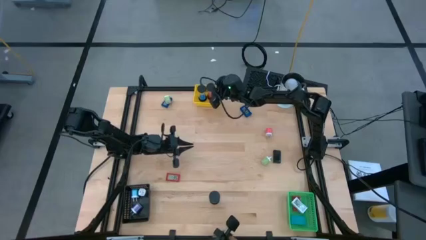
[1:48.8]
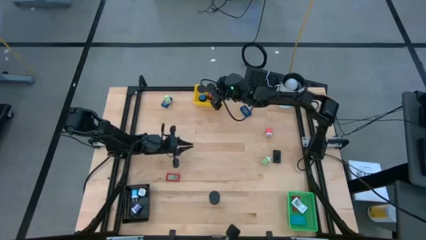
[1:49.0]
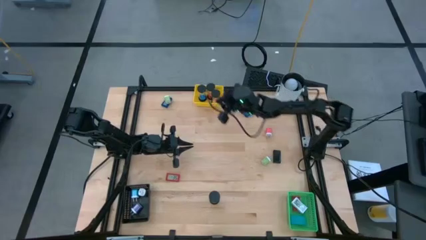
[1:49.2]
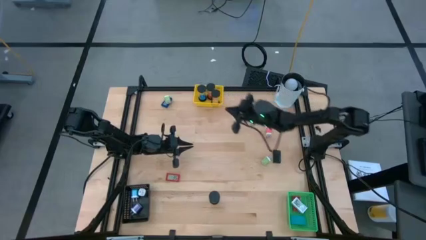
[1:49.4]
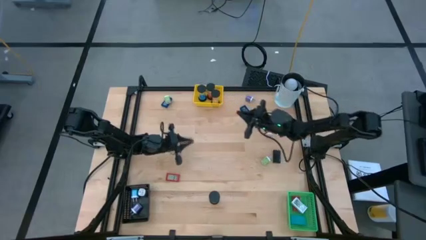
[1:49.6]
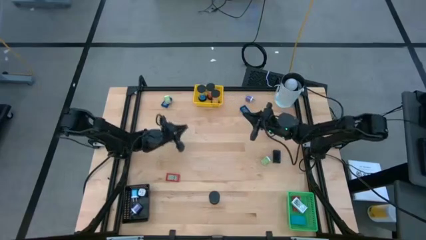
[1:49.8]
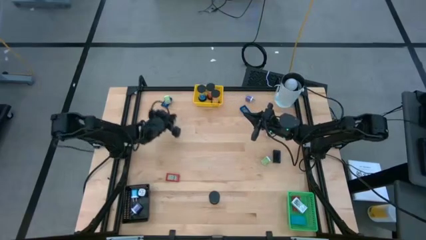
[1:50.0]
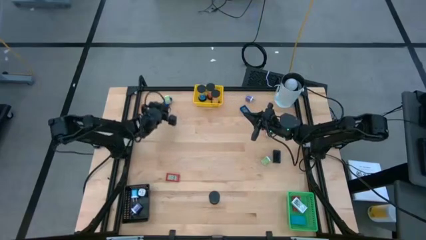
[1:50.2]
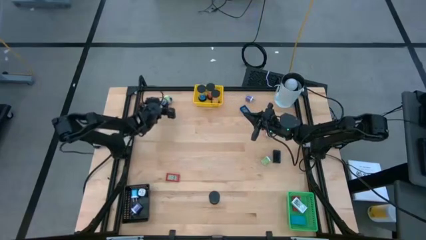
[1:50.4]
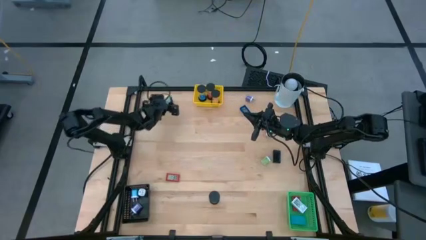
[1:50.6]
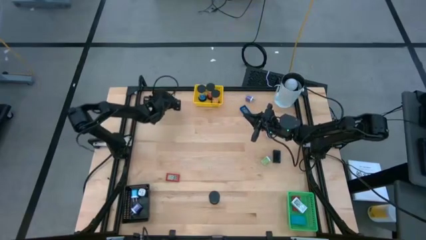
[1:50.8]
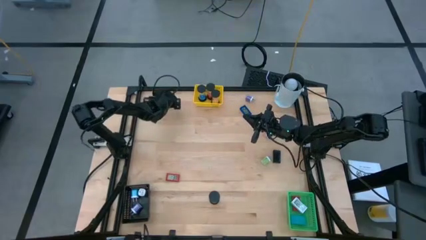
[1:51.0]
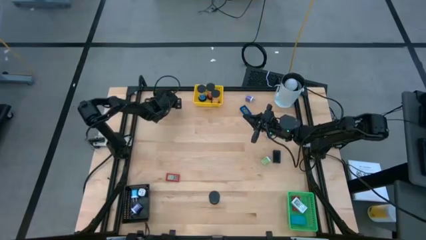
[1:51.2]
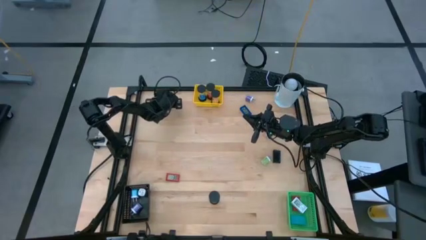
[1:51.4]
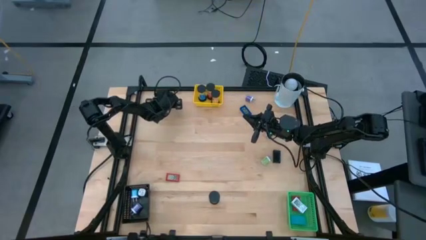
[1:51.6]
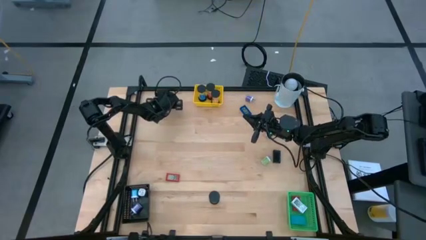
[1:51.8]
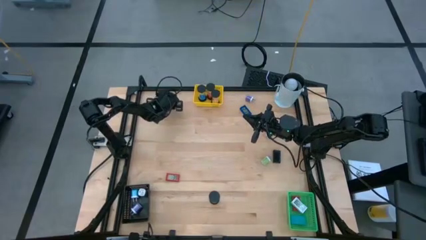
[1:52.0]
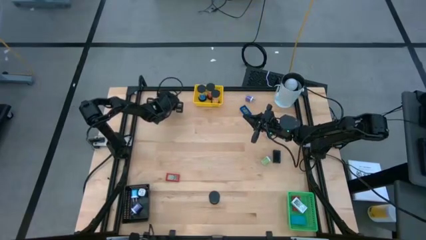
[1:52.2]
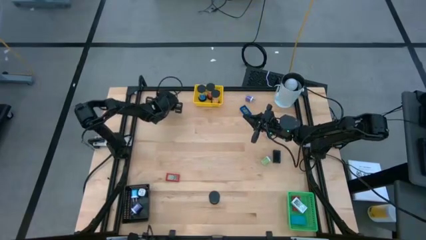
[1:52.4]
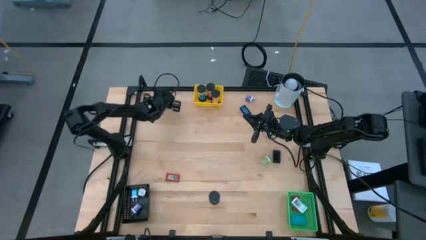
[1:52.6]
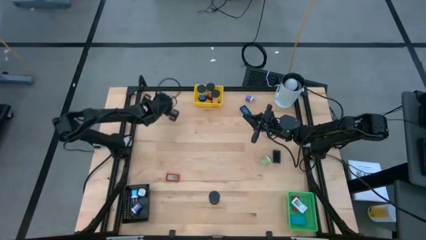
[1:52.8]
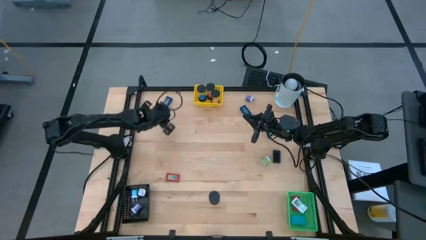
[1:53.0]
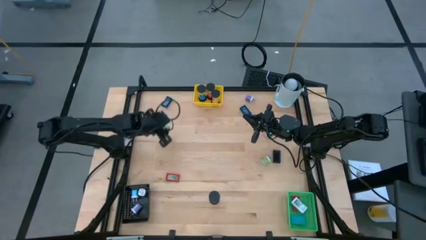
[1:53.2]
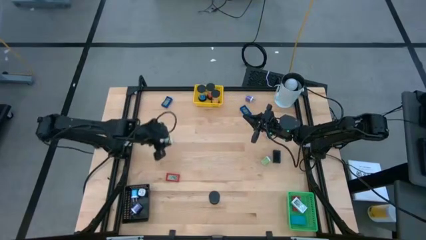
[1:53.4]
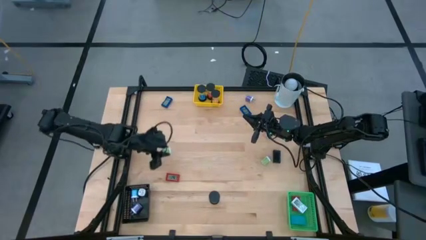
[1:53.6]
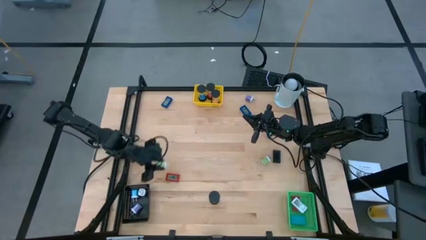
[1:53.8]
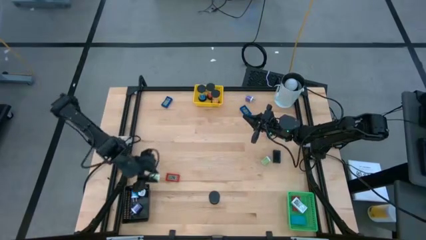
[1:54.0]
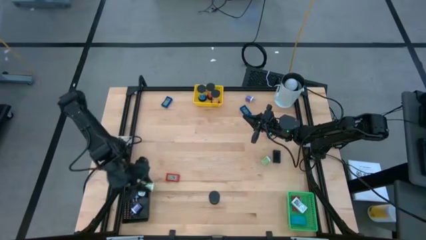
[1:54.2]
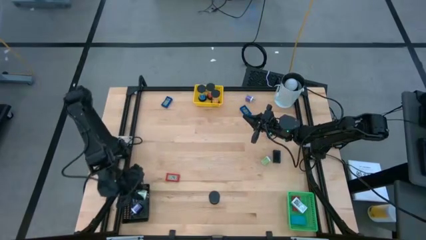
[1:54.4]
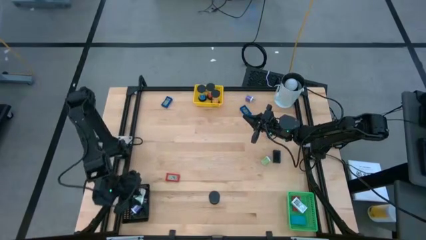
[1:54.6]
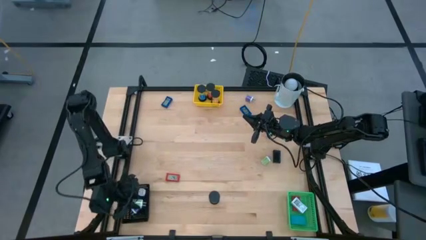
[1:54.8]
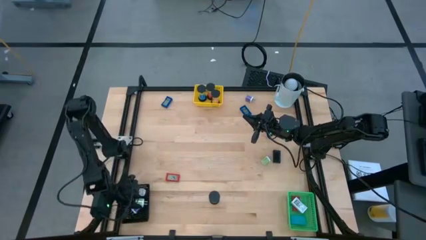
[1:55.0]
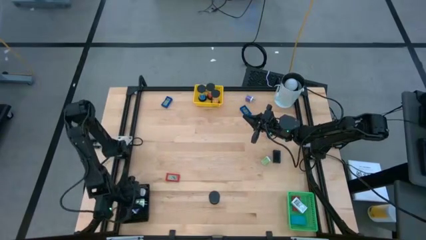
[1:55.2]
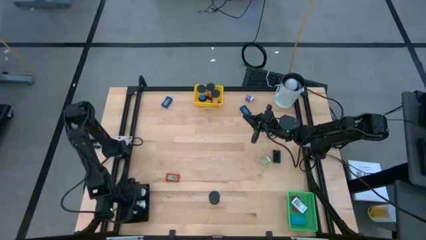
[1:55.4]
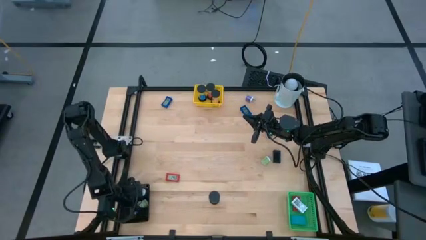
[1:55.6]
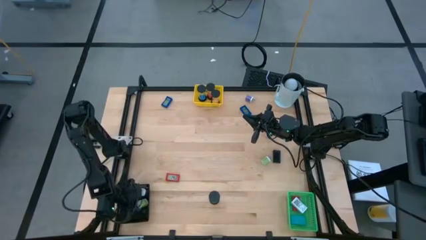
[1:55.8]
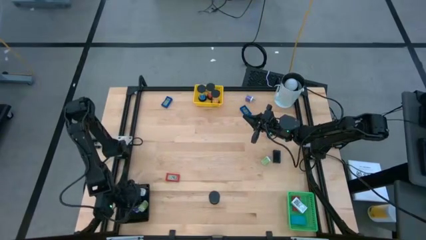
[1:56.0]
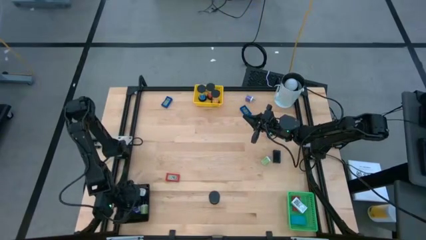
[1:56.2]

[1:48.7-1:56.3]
Task: Pick & Place Office items
Put the green charger adapter into the black bin

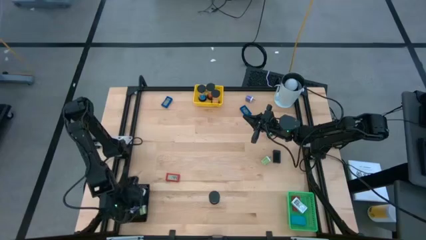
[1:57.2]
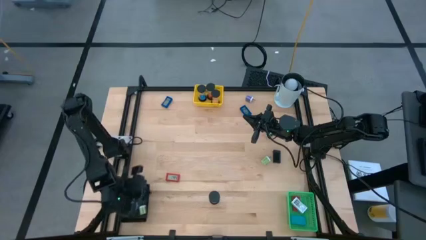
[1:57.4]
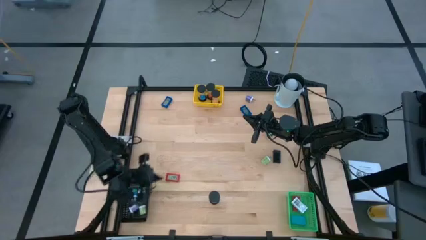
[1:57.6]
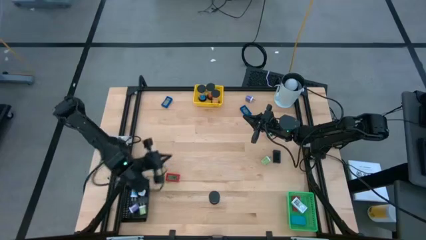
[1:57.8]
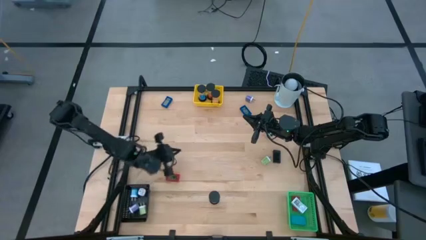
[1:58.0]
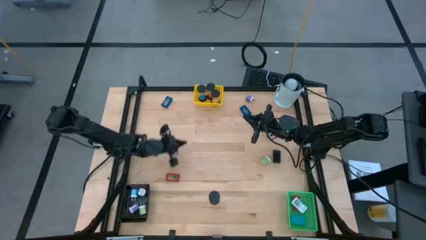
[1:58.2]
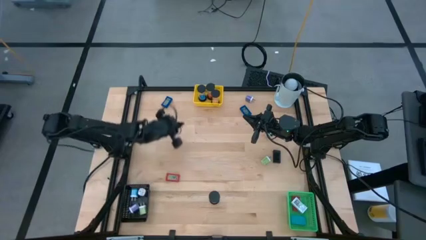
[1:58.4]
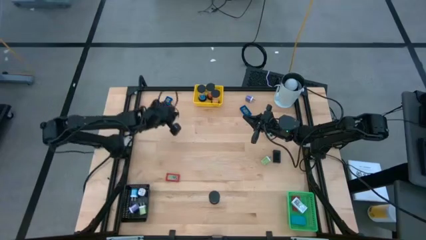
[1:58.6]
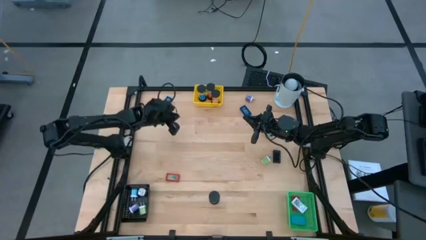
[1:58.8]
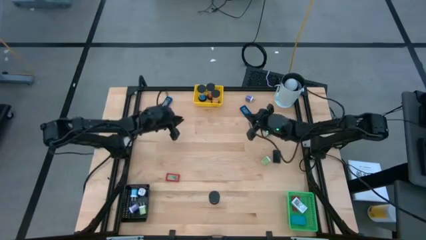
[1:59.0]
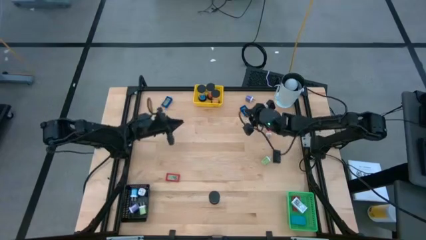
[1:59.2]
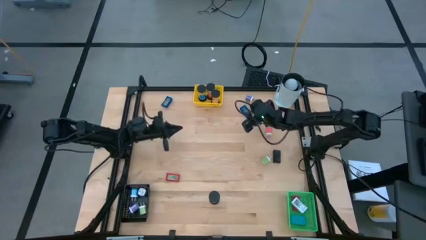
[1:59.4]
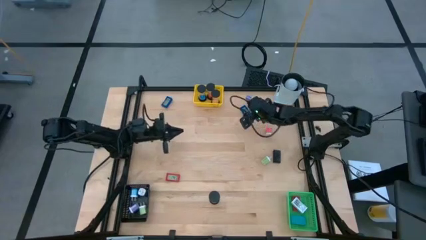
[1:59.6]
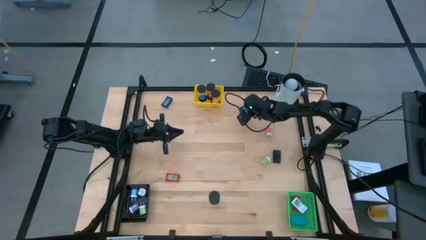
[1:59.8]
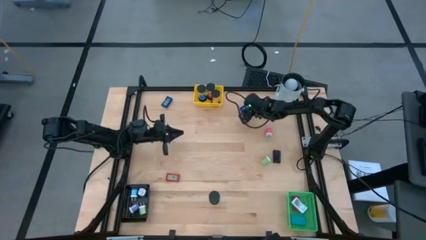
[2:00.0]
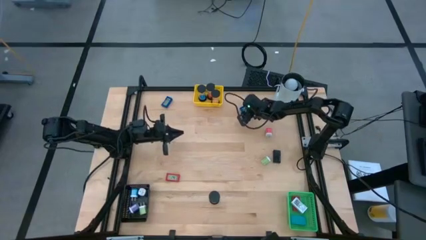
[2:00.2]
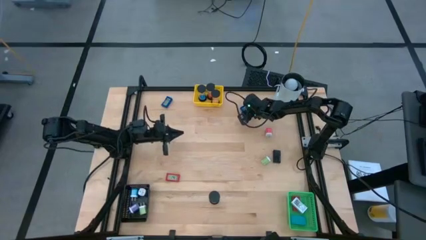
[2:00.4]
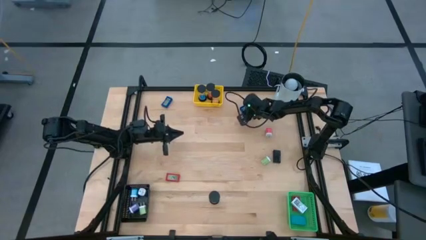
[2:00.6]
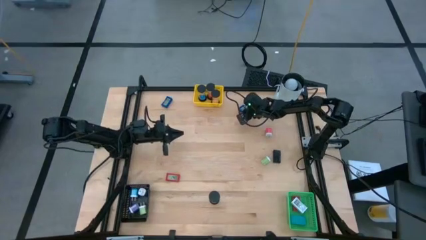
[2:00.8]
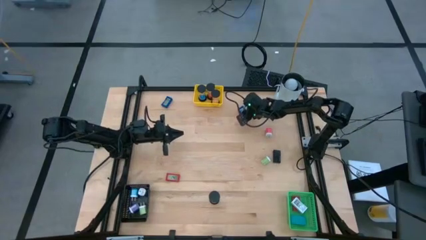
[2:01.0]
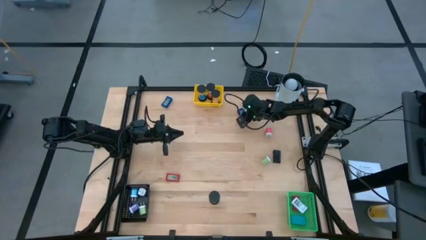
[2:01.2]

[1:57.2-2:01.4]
Put the blue digital timer into the green bin

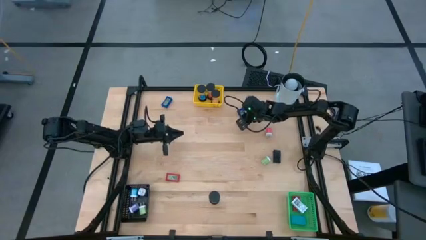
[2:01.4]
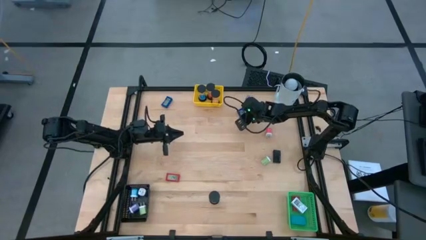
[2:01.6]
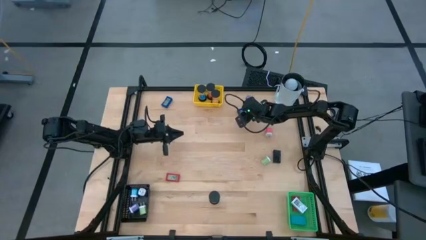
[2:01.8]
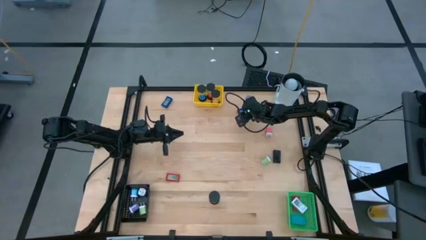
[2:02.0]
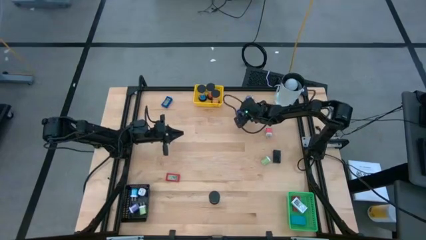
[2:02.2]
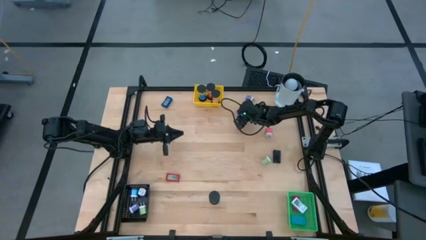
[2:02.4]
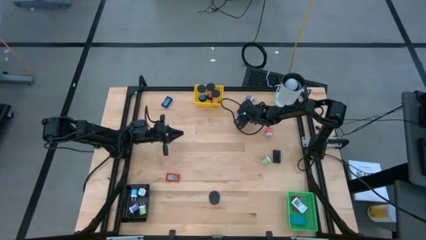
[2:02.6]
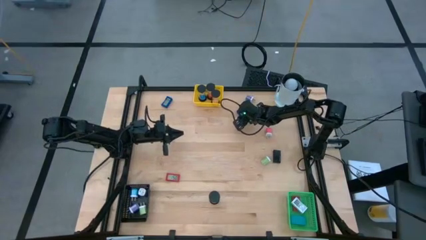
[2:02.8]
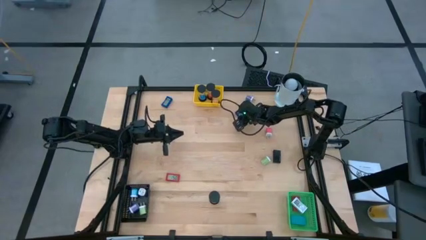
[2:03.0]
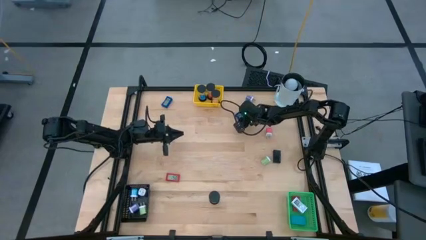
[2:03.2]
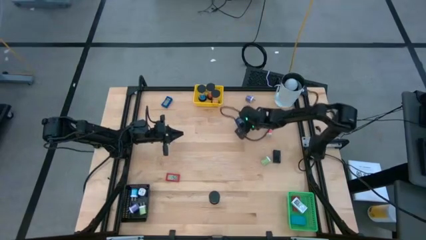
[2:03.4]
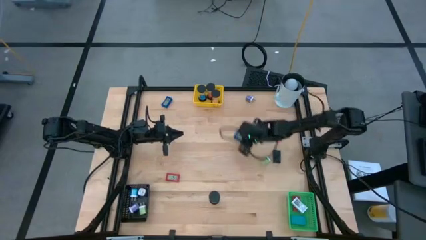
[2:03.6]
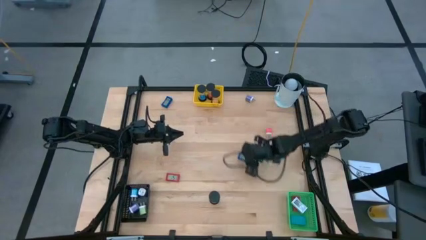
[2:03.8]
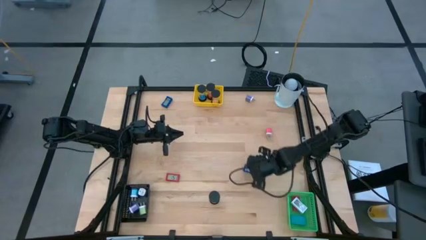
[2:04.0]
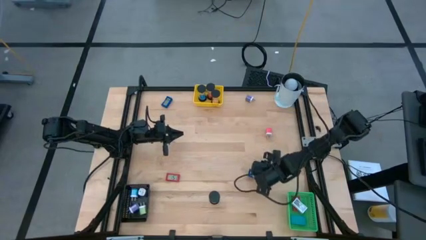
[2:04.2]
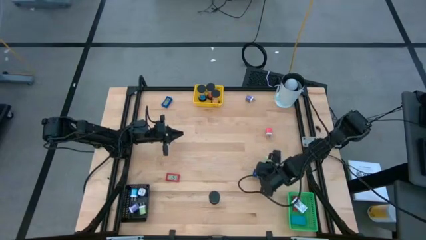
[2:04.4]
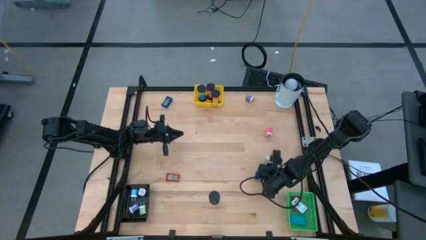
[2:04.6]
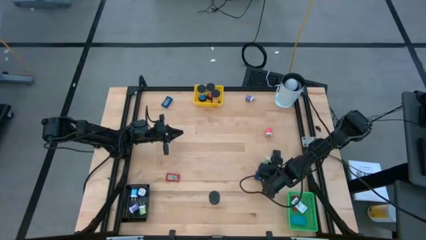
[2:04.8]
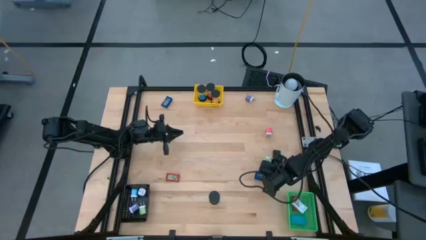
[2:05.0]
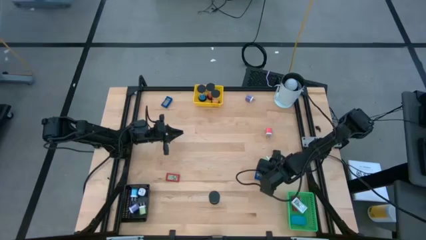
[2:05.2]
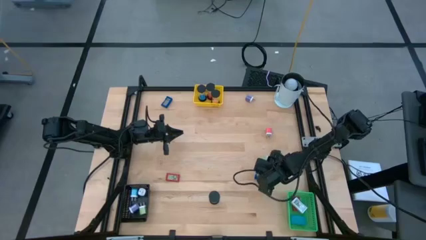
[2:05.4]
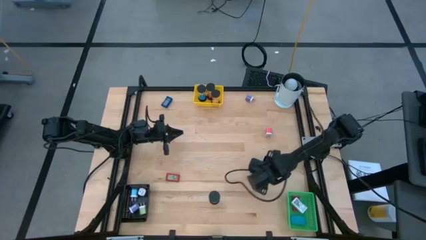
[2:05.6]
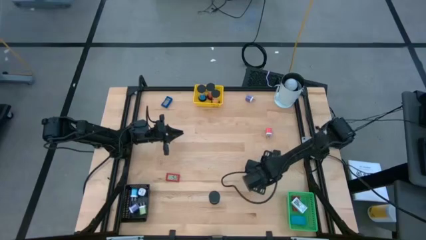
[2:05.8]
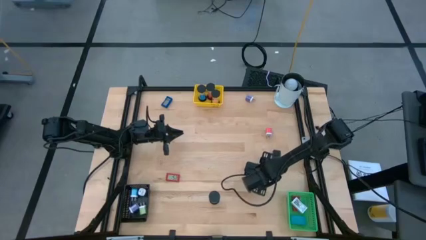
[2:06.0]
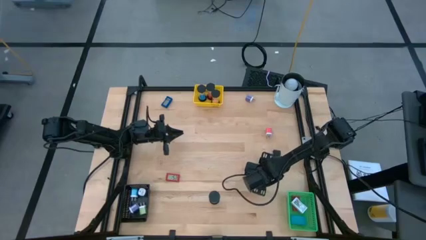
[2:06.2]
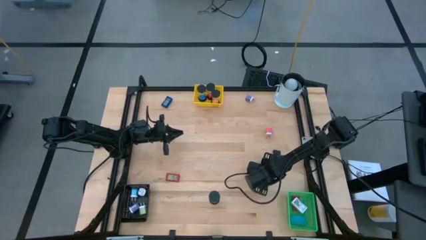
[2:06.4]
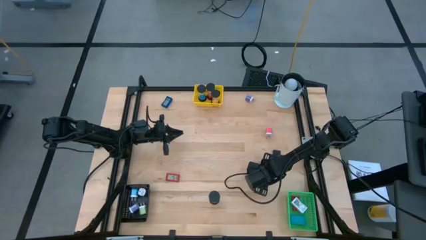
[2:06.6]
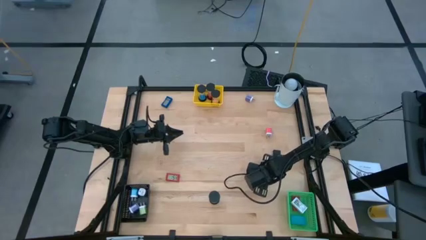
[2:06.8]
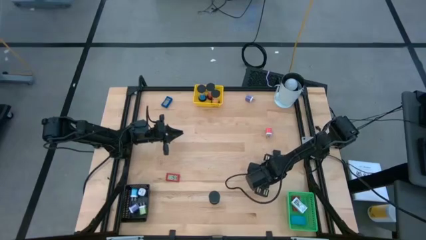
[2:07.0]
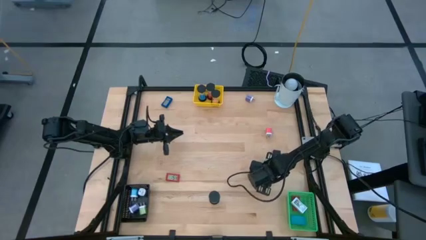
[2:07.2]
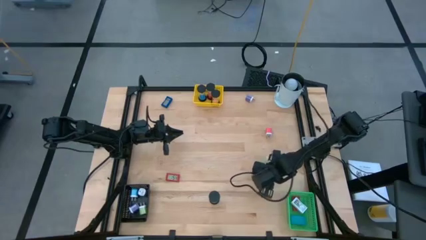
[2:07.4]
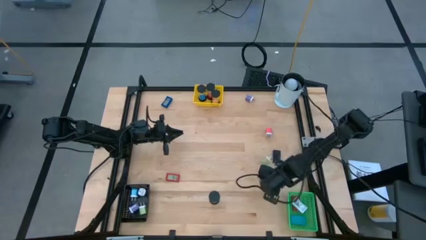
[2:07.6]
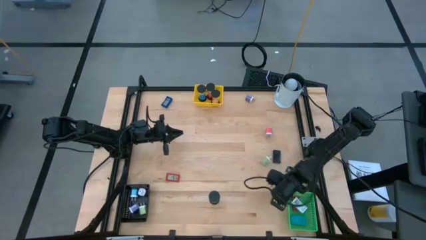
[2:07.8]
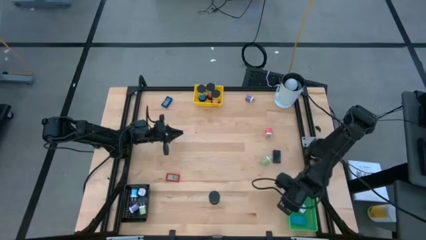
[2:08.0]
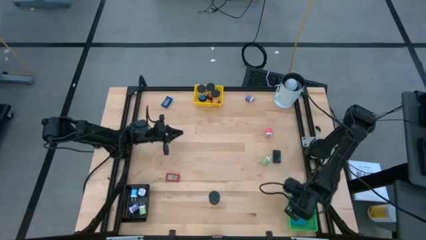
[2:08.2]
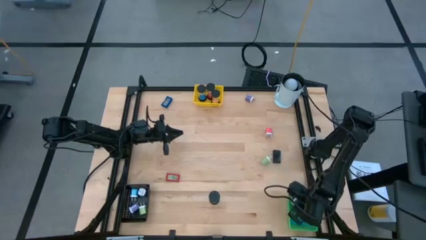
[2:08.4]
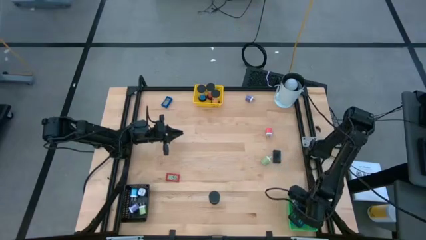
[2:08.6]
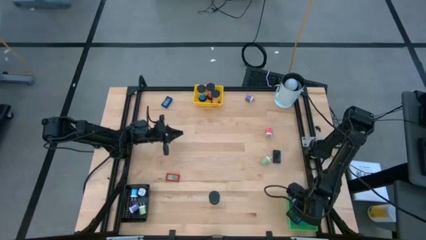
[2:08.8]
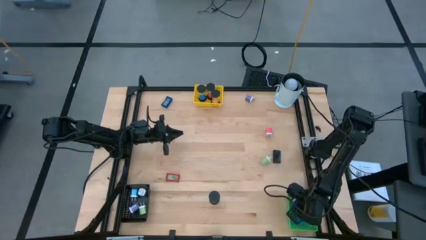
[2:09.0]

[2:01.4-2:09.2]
Put the blue digital timer into the green bin
